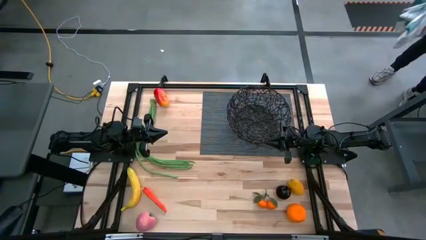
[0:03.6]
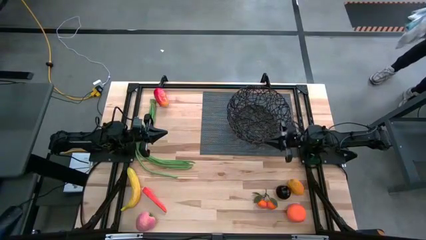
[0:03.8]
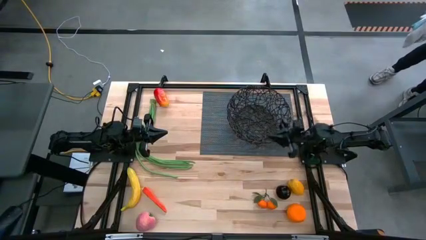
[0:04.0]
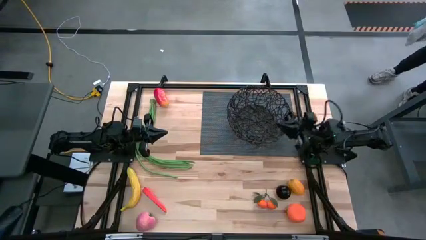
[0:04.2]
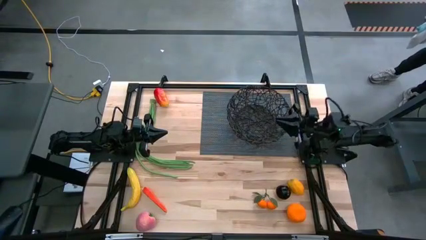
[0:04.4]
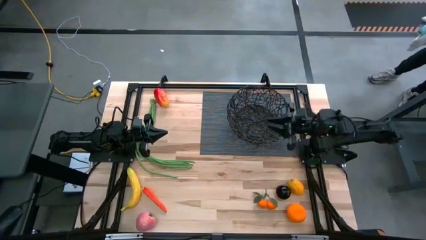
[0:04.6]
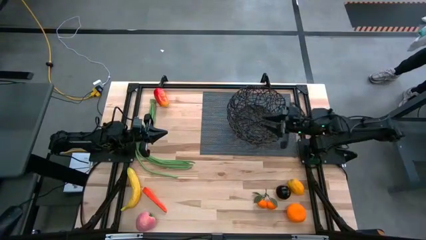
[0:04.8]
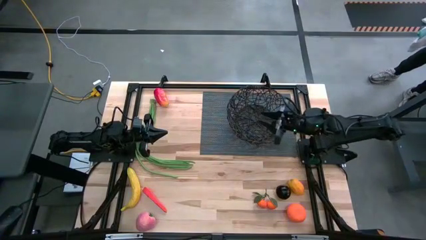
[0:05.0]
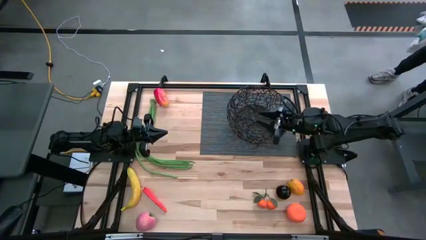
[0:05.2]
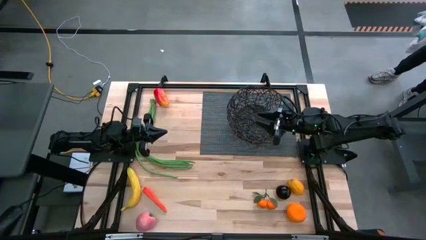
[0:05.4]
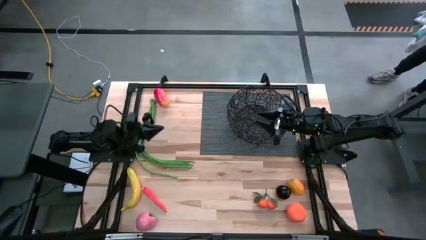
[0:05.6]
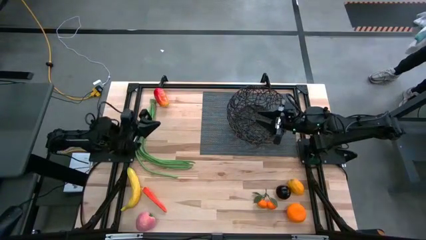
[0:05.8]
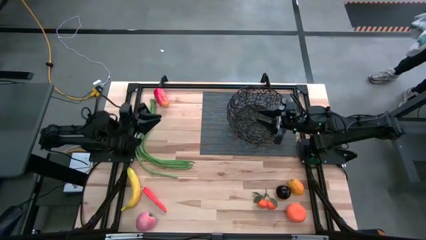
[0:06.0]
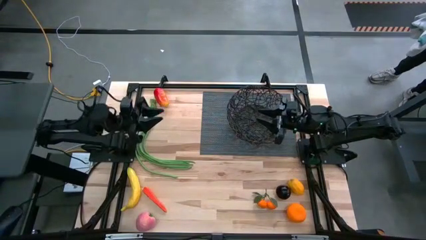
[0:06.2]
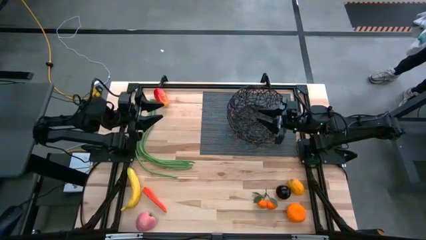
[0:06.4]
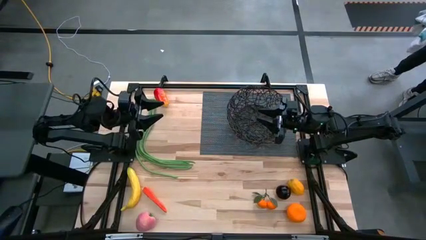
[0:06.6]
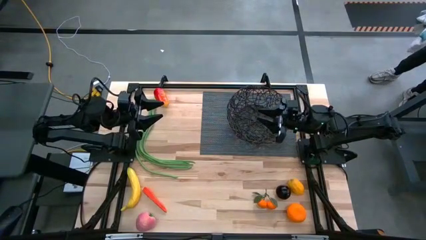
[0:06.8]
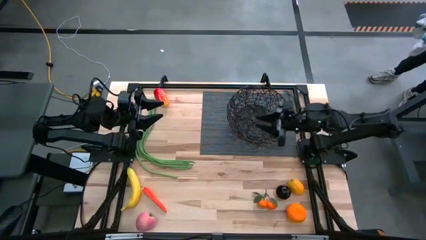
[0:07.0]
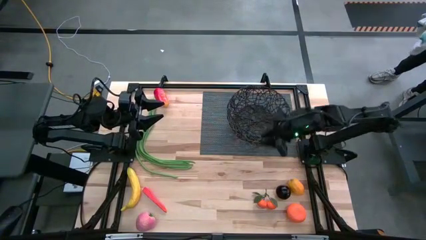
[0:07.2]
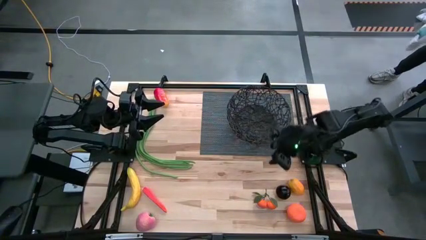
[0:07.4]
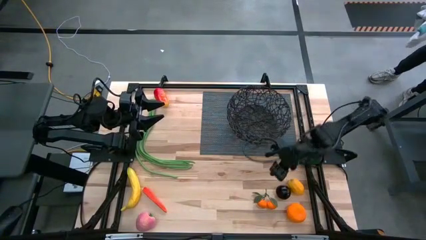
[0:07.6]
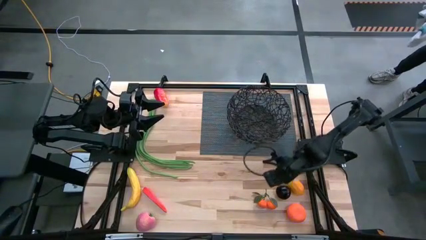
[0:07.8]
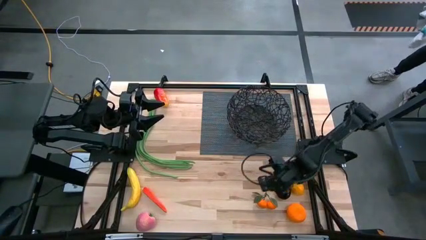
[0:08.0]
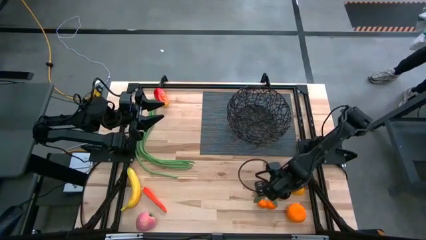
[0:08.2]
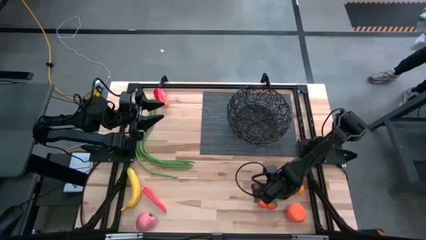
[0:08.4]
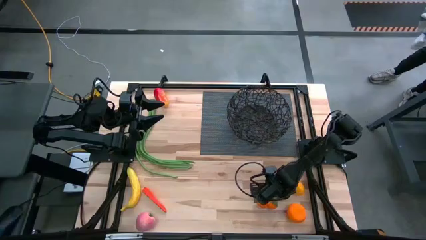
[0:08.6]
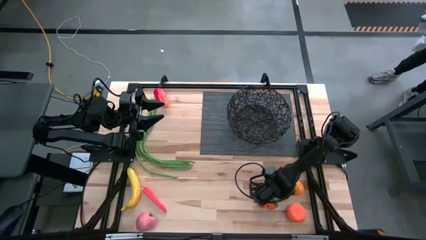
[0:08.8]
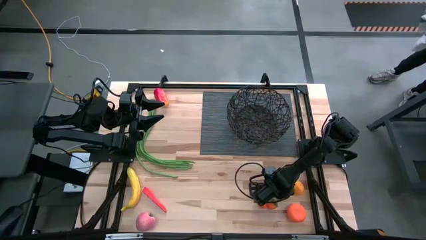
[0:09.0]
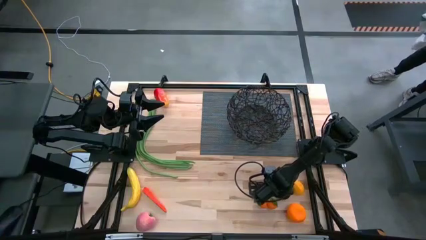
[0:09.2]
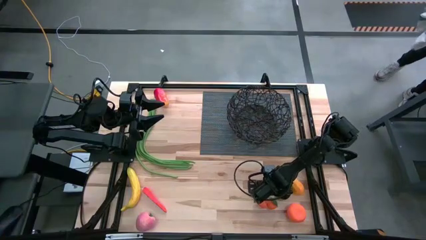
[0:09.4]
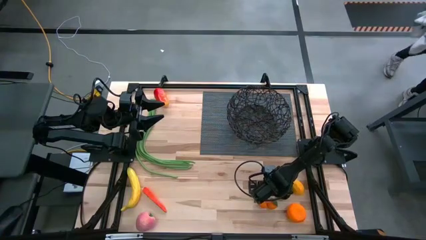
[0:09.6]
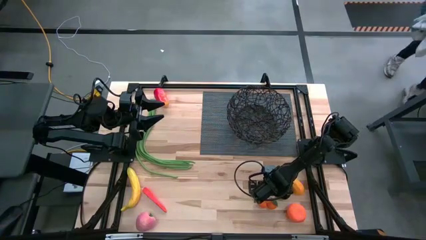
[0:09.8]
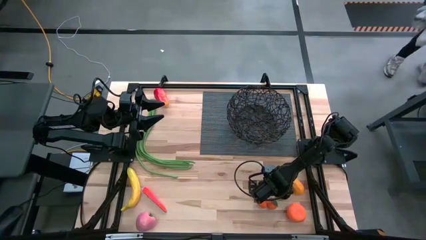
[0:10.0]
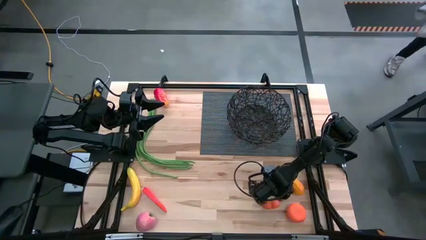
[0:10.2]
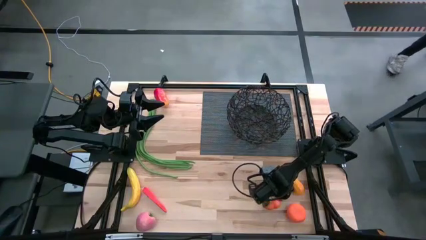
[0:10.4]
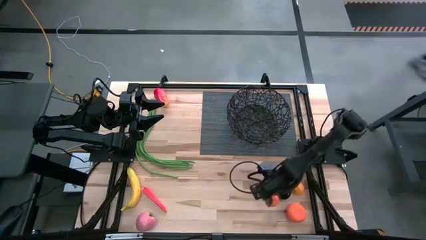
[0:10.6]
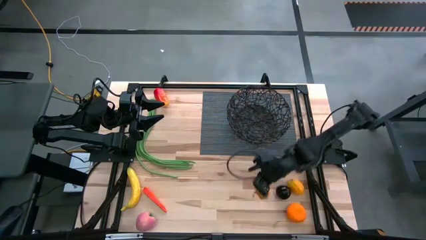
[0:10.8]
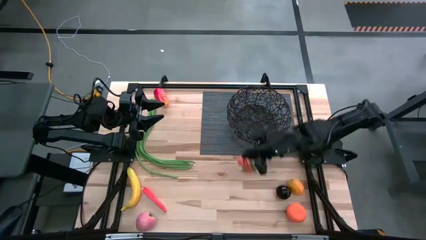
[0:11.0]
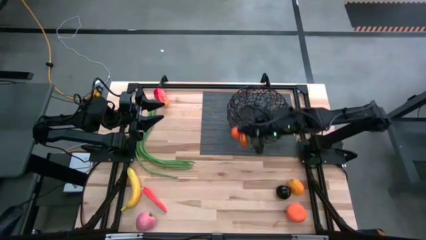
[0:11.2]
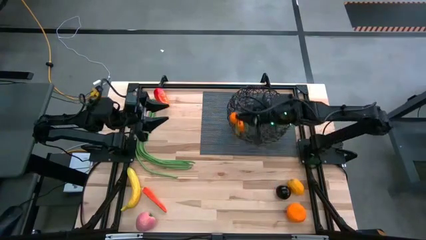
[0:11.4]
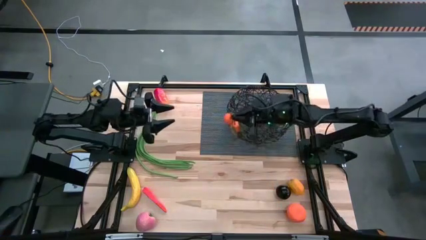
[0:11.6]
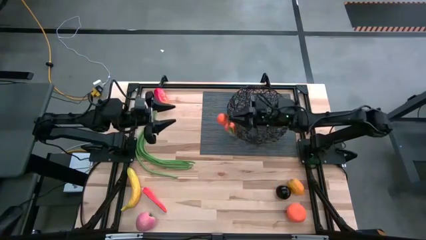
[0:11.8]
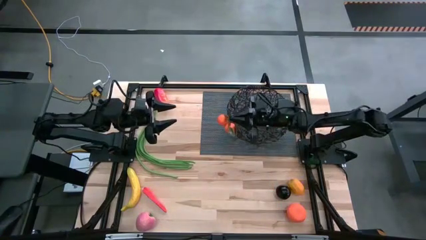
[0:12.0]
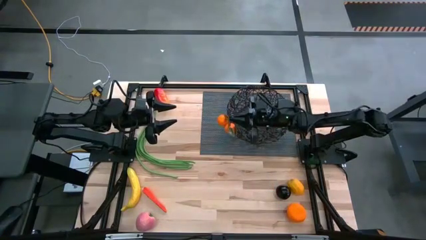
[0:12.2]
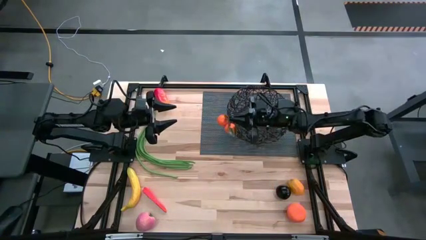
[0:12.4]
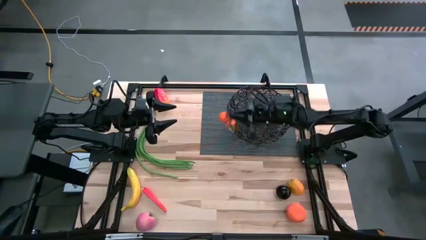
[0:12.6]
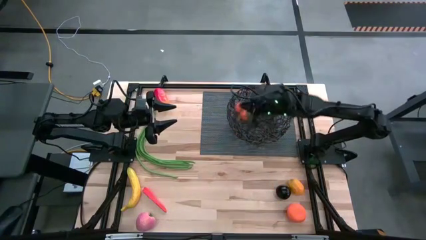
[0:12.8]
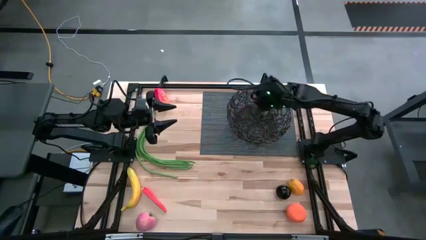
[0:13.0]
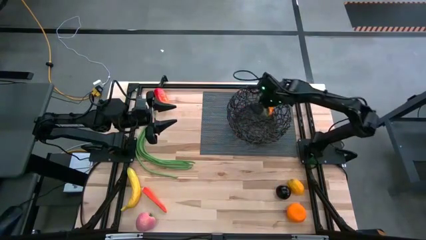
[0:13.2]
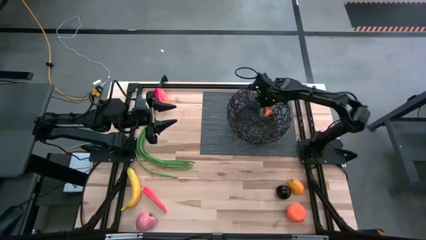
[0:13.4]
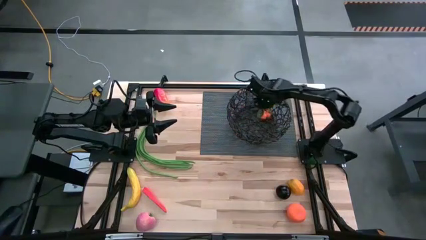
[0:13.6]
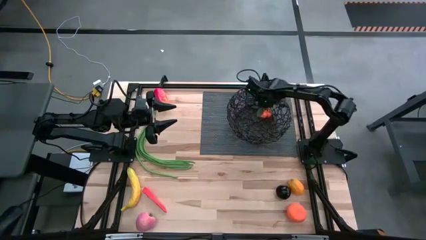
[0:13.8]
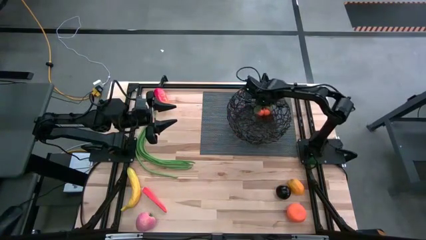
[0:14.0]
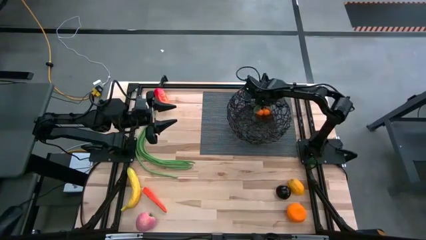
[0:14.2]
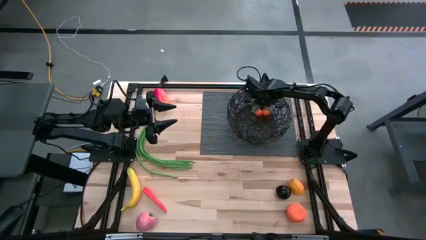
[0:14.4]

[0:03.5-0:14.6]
Task: Build produce basket
Put the tangerine into the wire basket

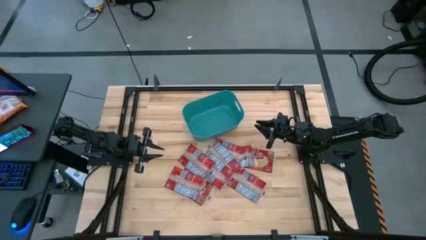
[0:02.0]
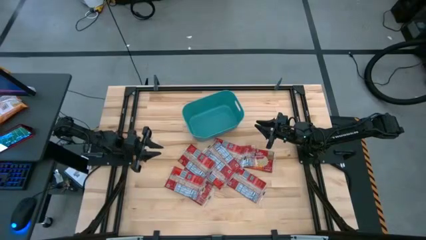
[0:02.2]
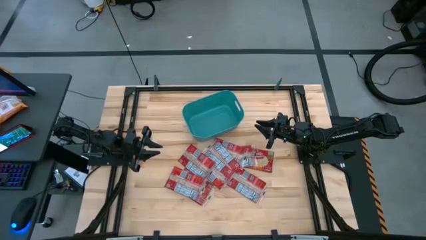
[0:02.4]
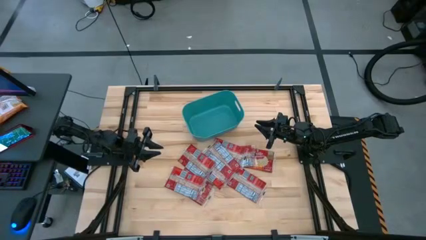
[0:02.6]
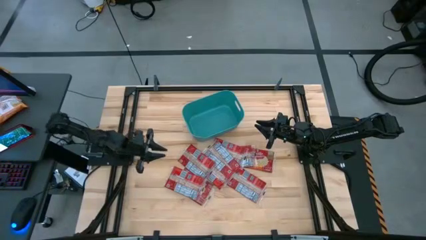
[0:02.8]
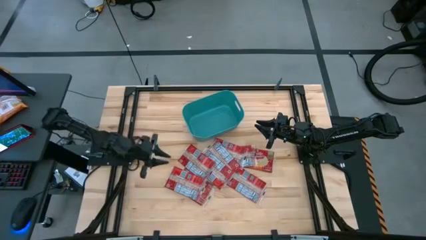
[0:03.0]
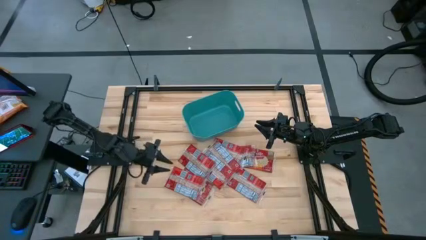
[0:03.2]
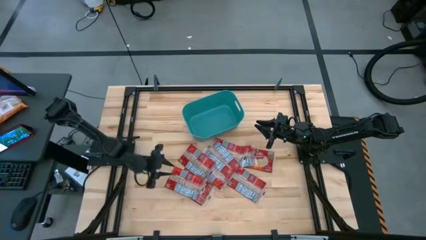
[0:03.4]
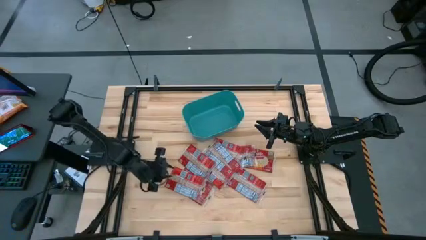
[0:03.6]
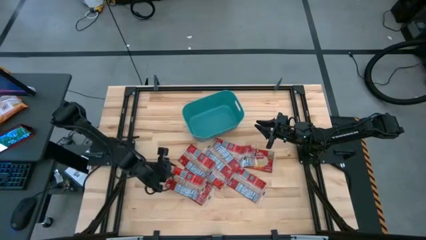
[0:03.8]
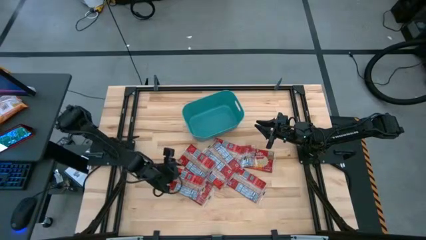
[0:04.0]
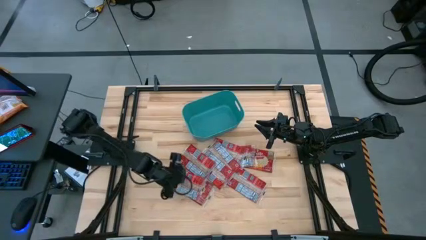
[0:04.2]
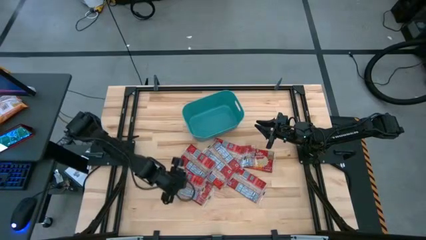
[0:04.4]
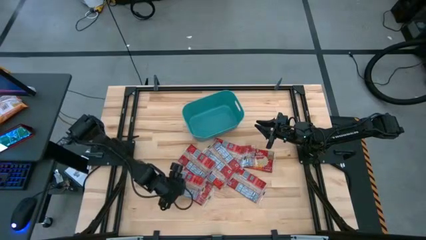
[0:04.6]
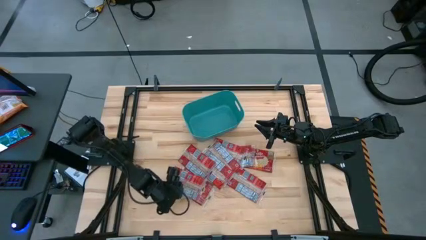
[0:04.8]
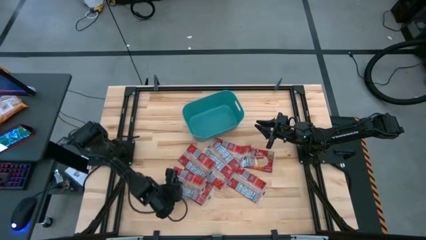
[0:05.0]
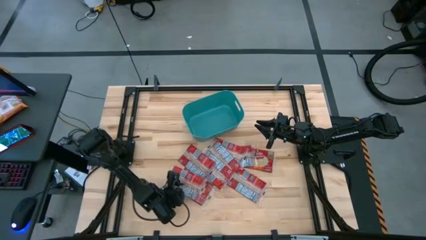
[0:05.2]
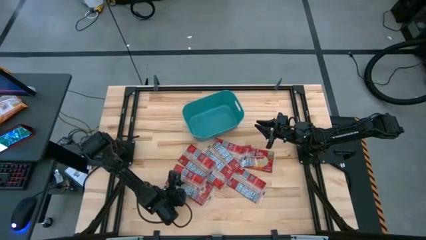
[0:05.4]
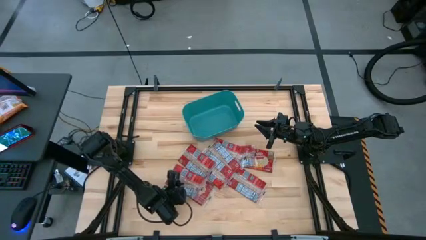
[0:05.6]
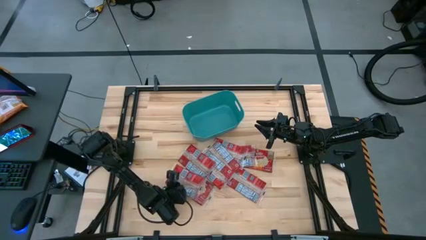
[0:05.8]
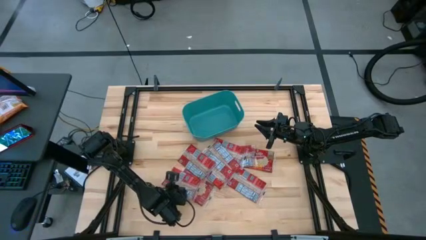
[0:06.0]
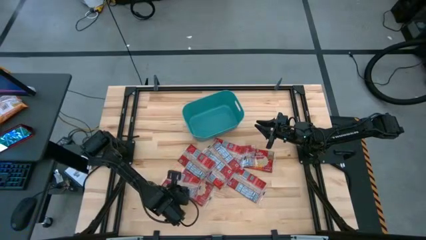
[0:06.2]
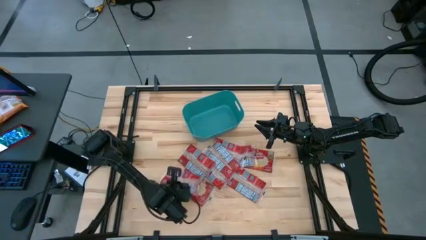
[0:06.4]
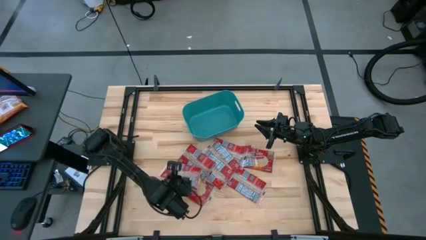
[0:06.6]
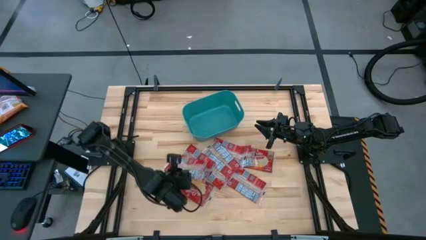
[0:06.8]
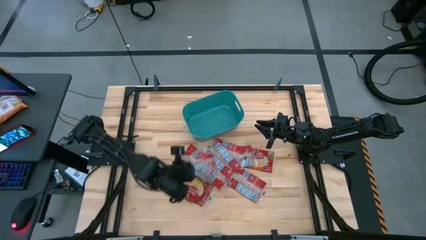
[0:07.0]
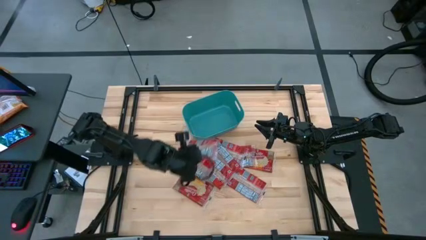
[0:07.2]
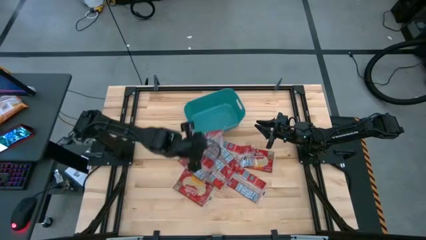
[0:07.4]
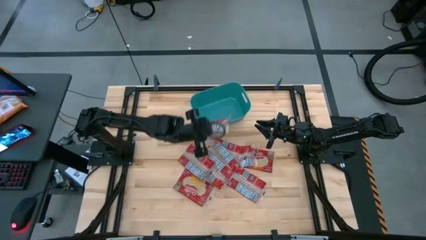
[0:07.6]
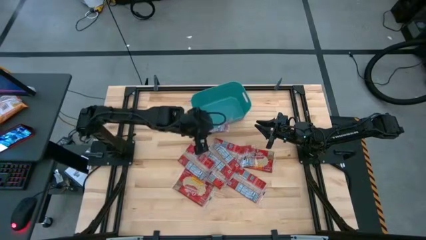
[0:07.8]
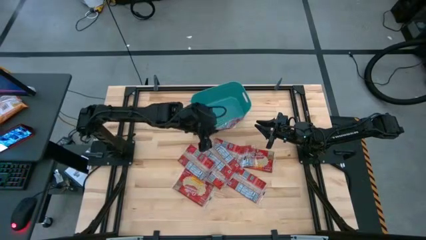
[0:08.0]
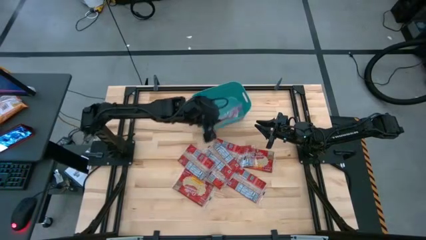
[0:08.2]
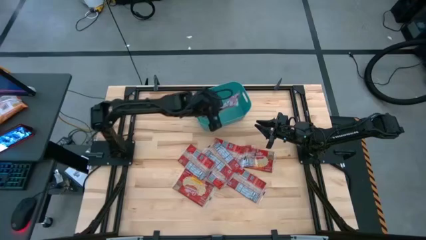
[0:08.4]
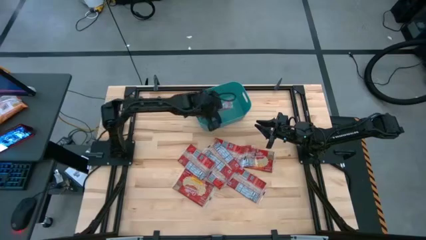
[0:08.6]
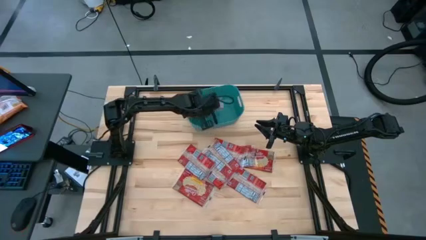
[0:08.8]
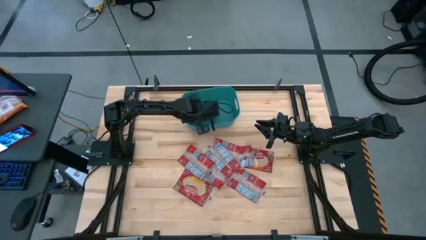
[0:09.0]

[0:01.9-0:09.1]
Task: Sort popcorn bags into baskets
Put the red popcorn bag into the blue bin
